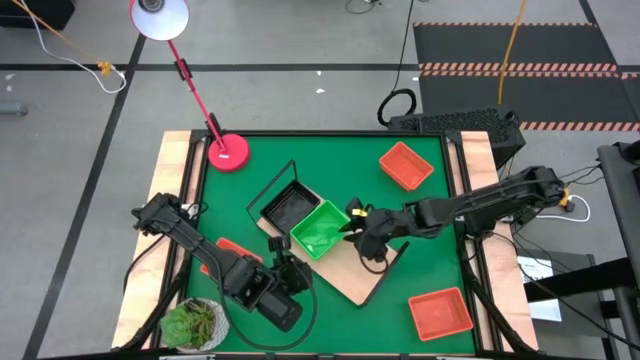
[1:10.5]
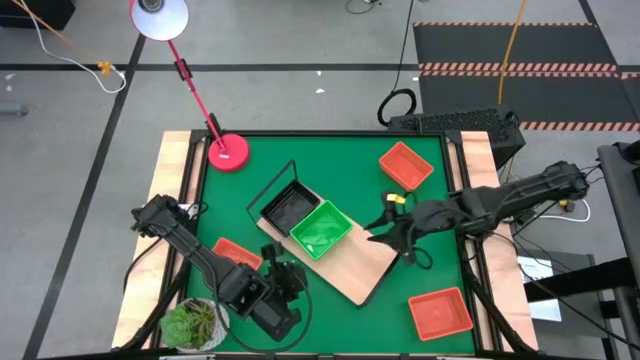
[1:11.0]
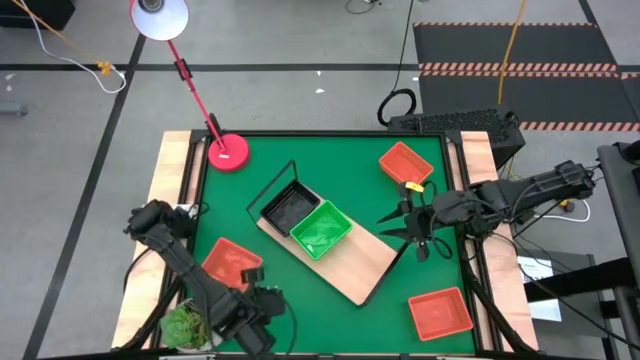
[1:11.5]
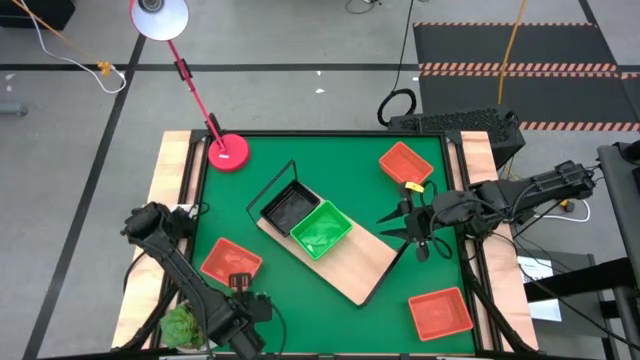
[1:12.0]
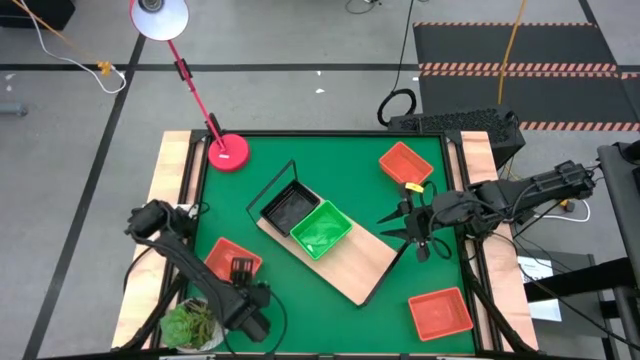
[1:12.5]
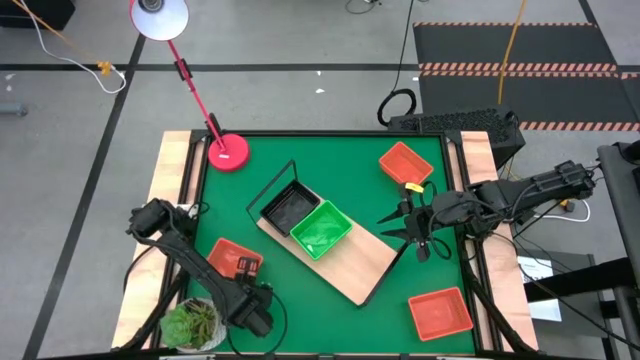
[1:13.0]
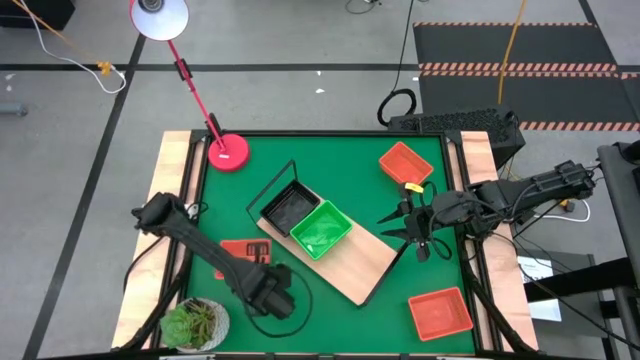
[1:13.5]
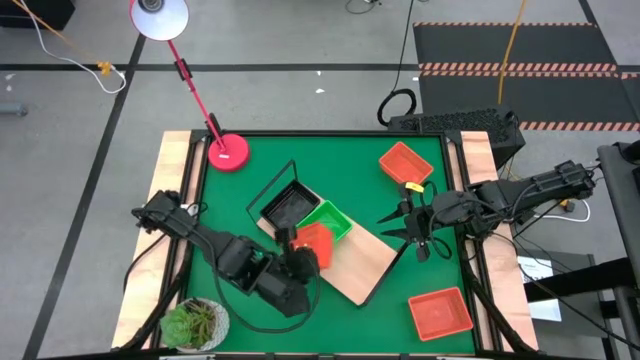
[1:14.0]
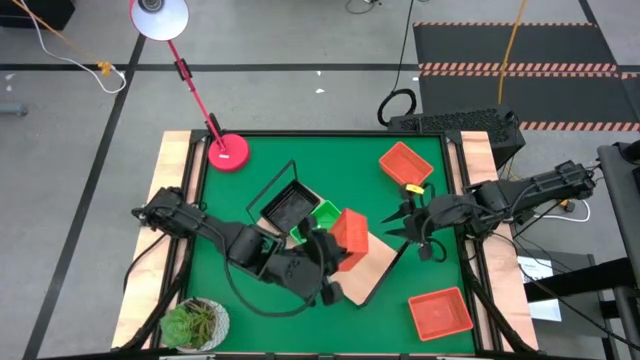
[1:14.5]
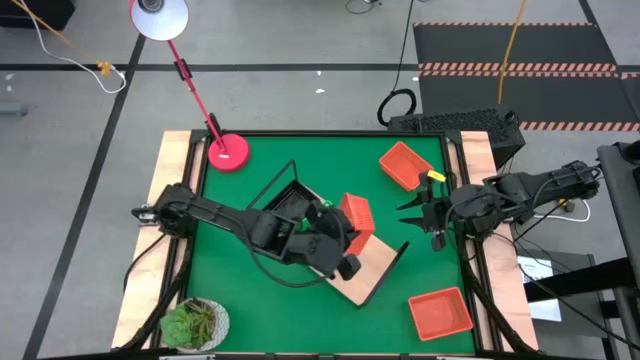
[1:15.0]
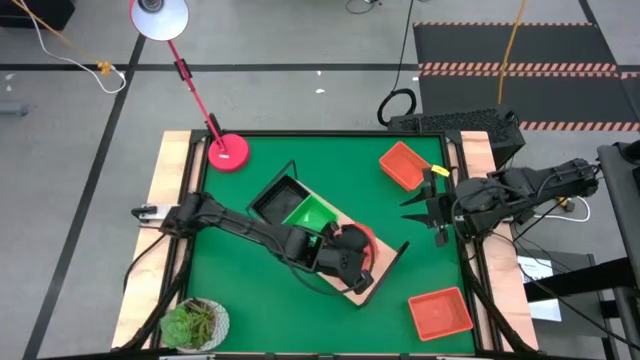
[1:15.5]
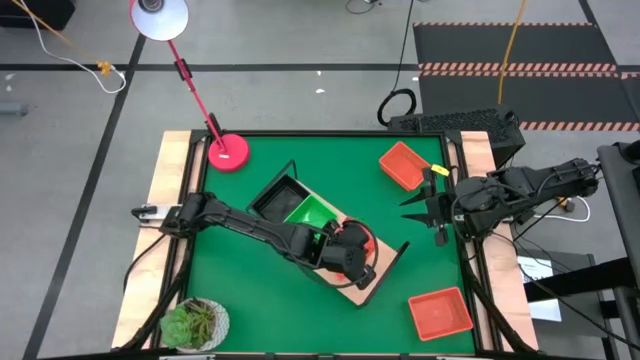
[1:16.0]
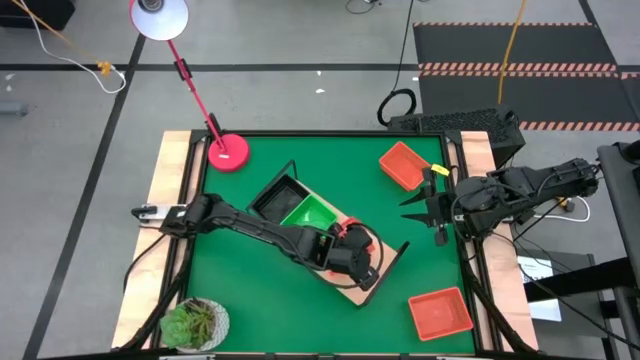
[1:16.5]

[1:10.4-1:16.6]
Task: Stack baskets on shelf by color
Put the middle orange bin on the shelf

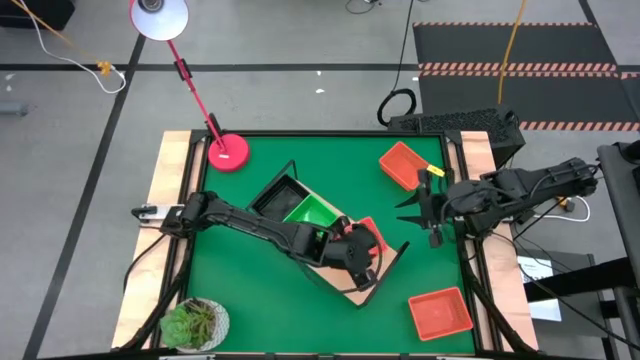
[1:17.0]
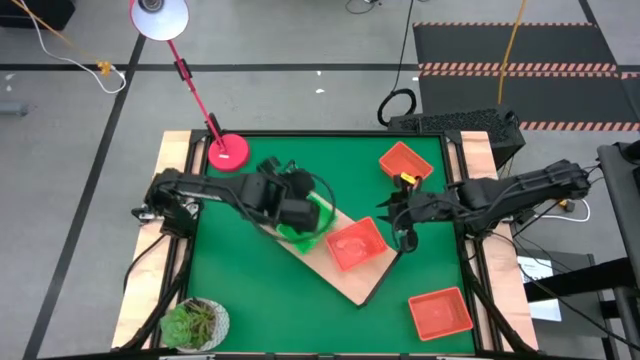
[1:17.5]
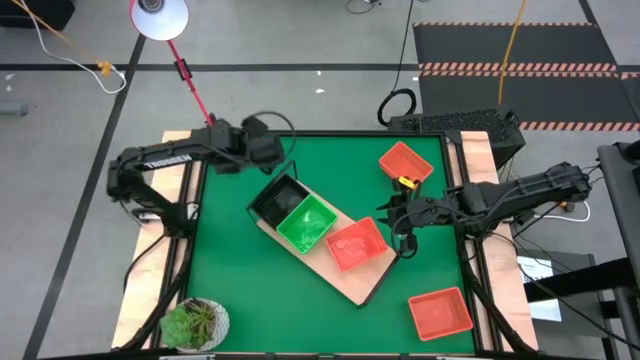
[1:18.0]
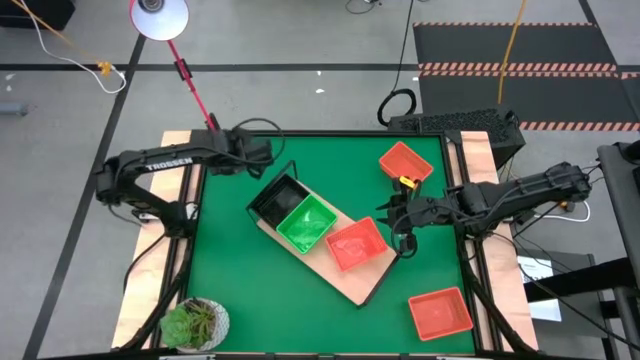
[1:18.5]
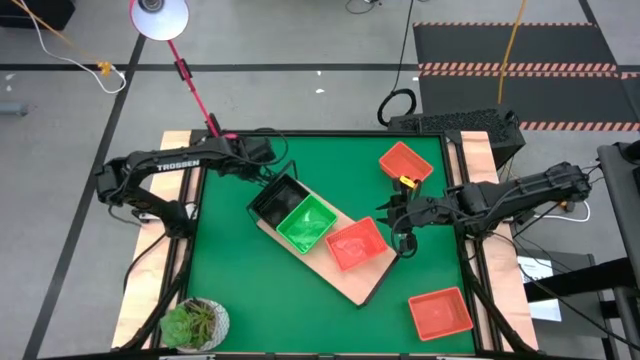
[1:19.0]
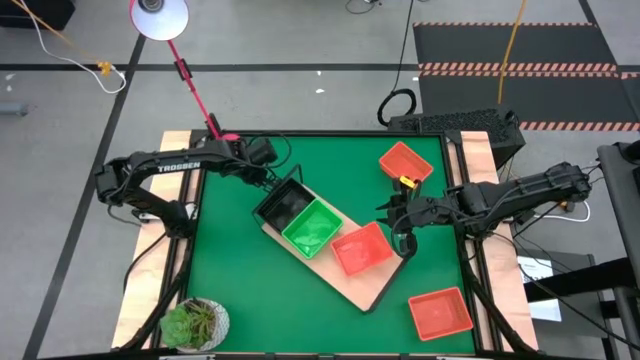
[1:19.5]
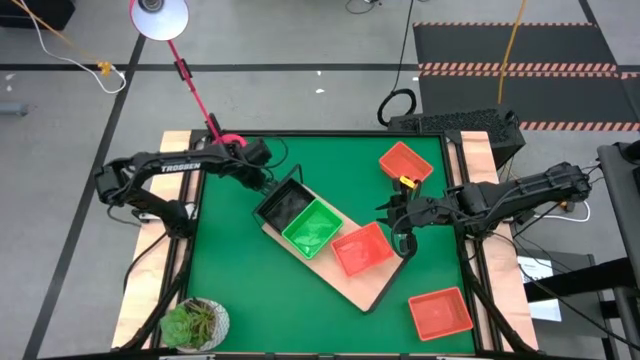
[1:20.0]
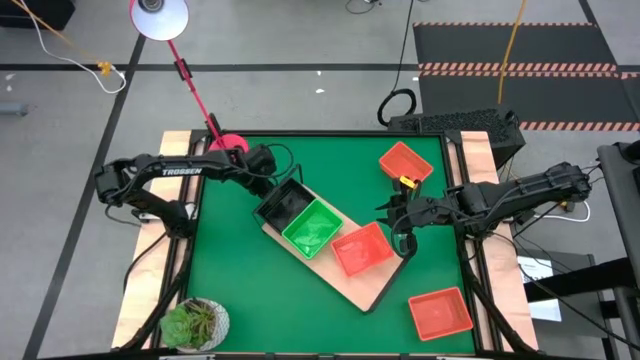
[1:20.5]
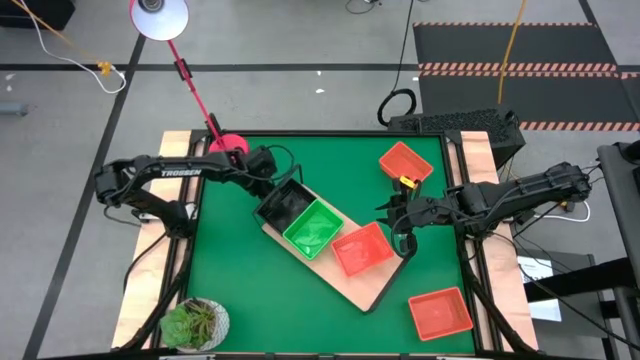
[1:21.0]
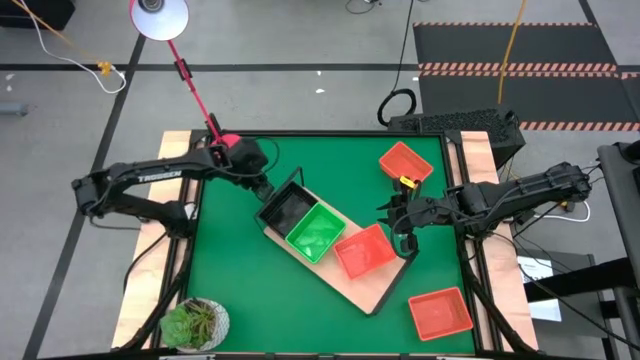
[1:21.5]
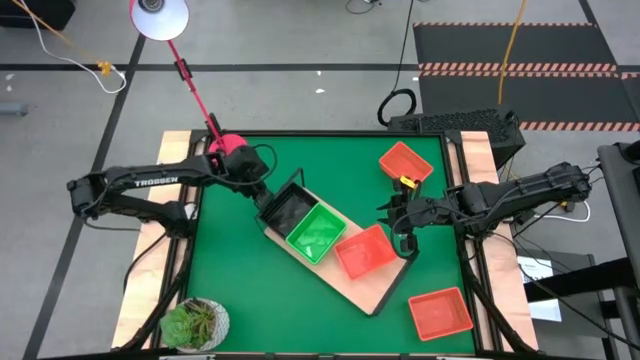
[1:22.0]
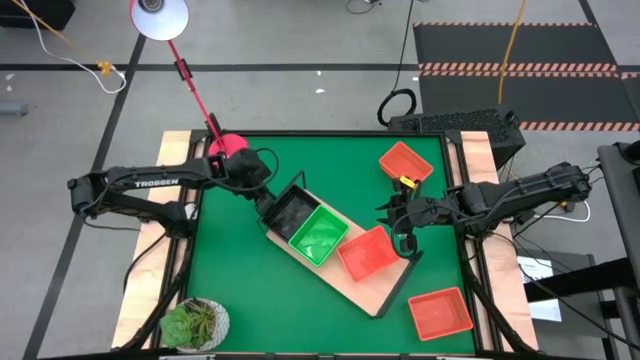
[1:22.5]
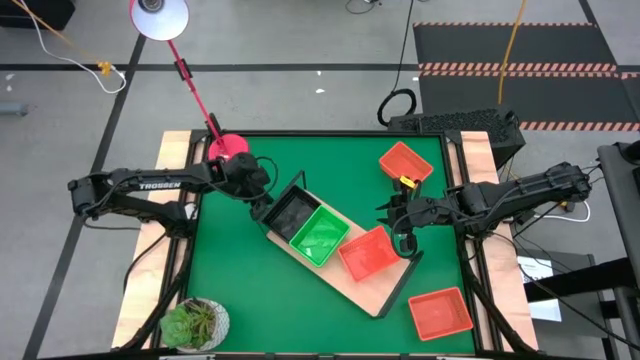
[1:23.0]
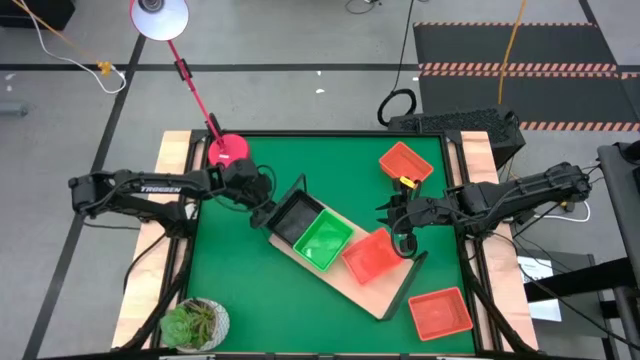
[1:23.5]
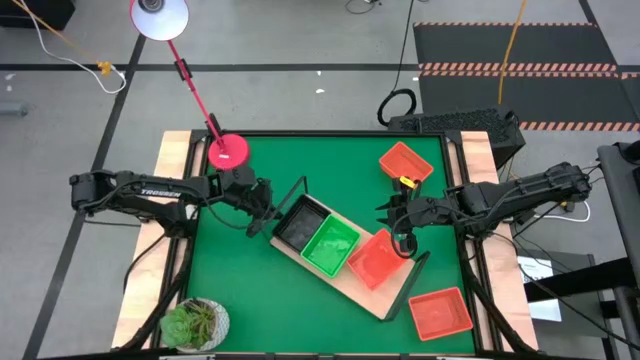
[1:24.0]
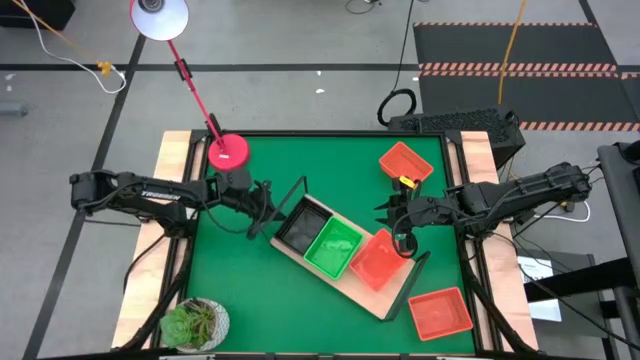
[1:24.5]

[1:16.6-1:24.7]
Adjust the stacked black bins on the shelf

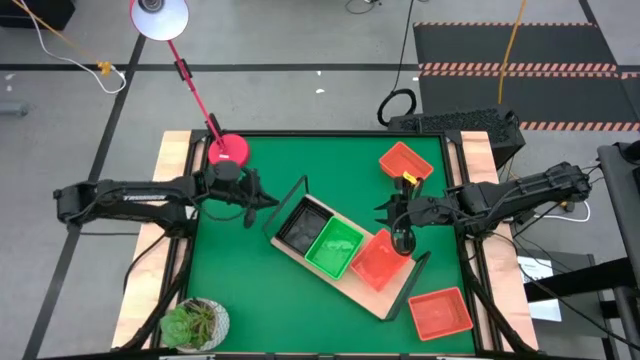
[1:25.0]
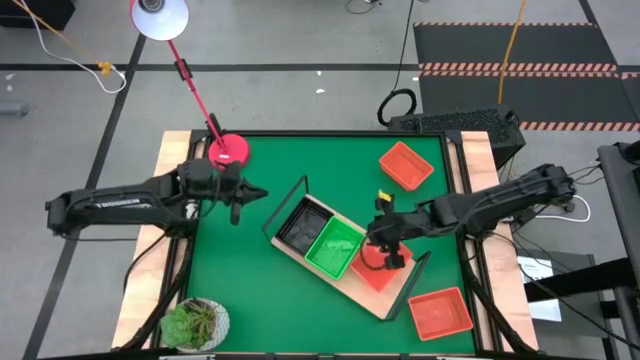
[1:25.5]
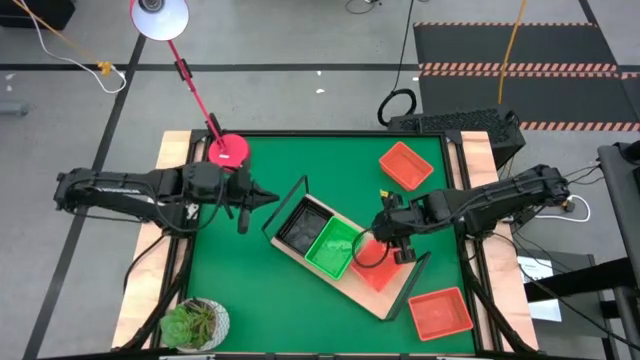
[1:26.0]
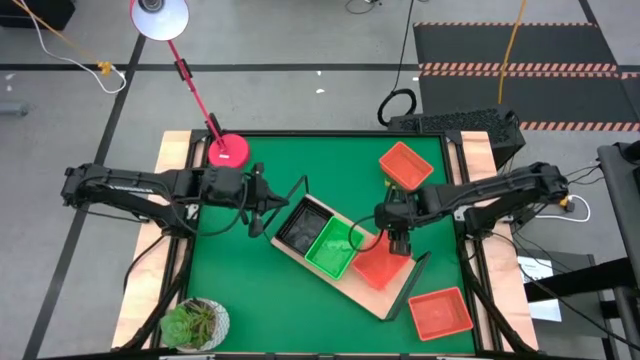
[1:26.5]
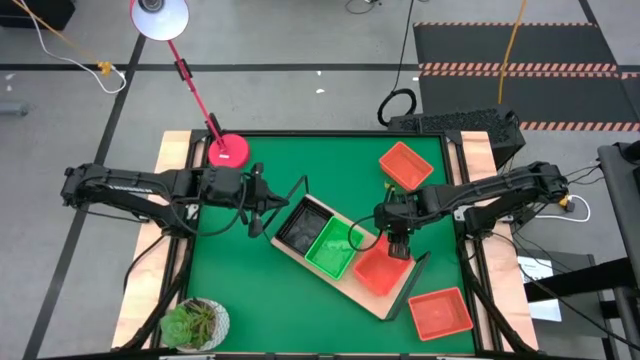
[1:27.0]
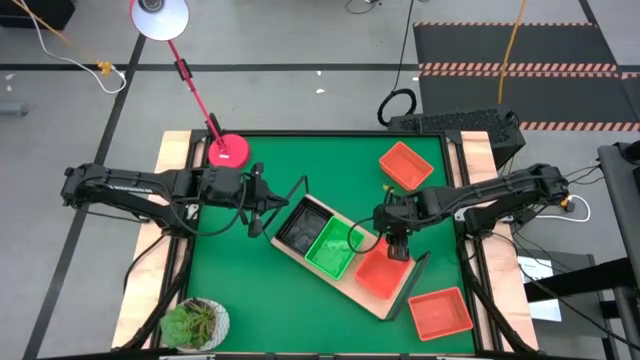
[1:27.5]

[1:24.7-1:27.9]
Adjust the orange bin on the shelf

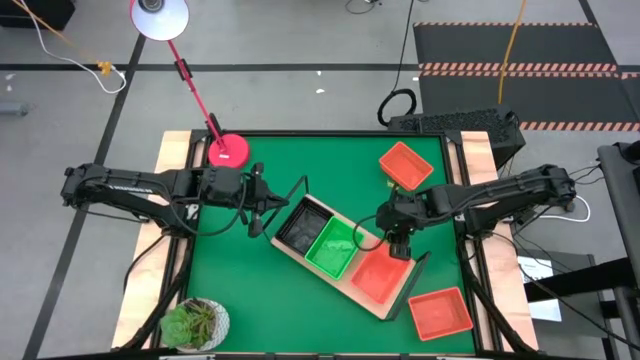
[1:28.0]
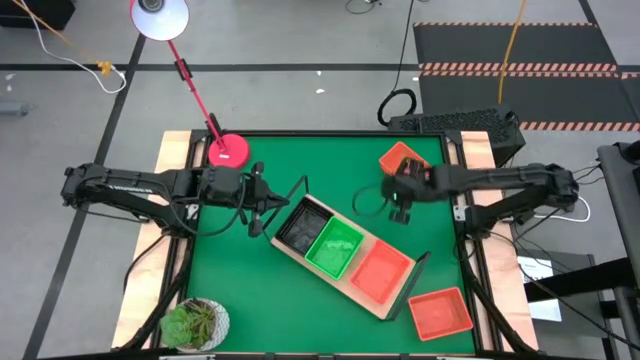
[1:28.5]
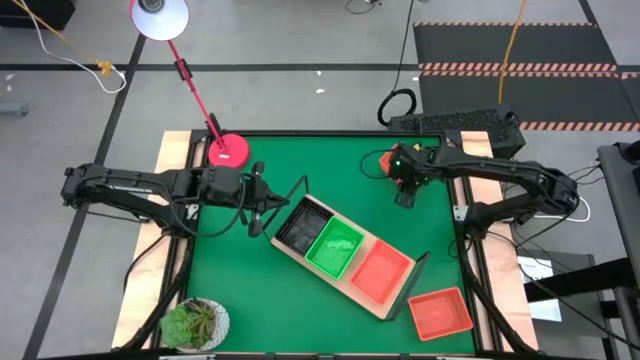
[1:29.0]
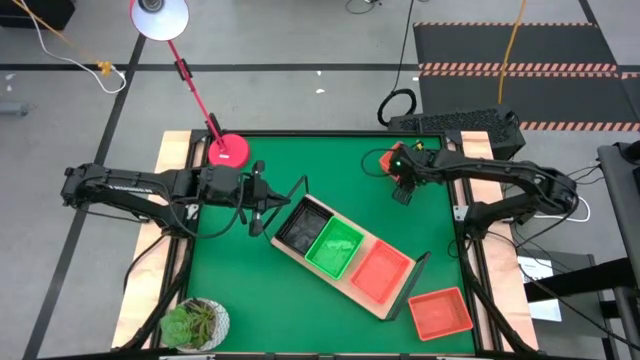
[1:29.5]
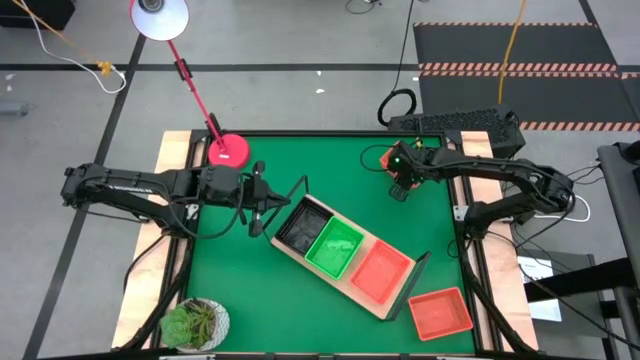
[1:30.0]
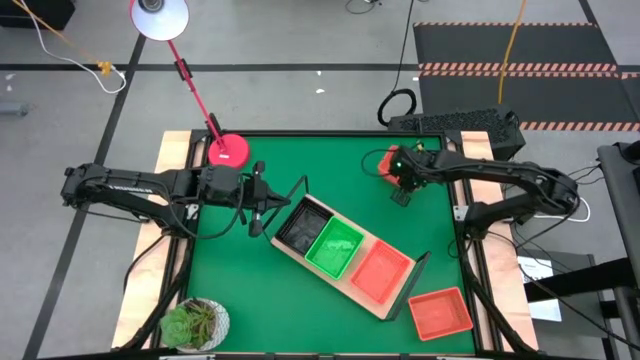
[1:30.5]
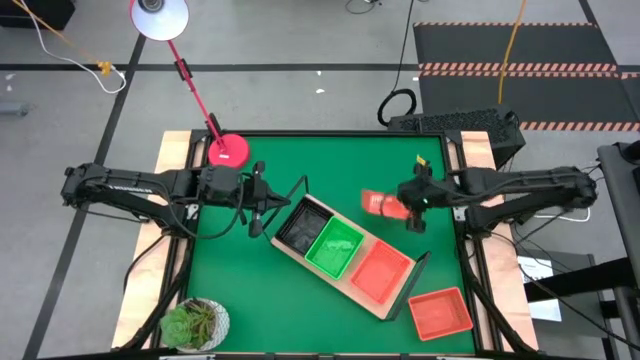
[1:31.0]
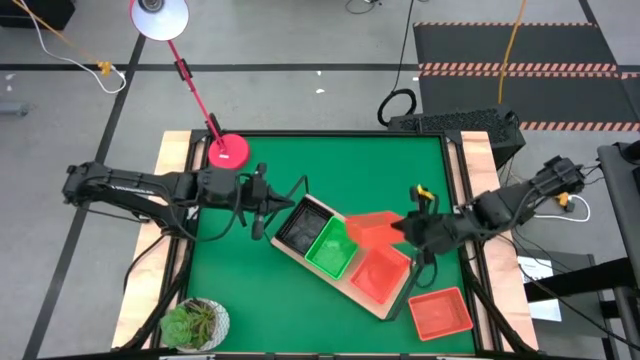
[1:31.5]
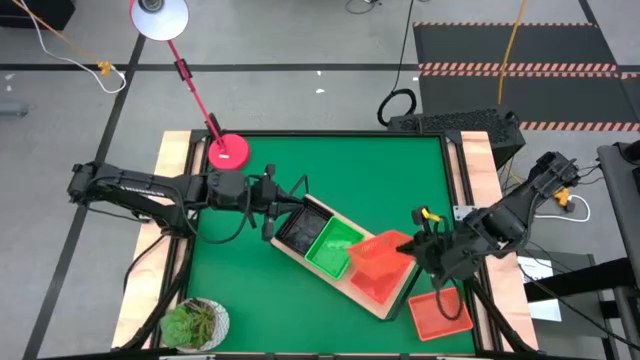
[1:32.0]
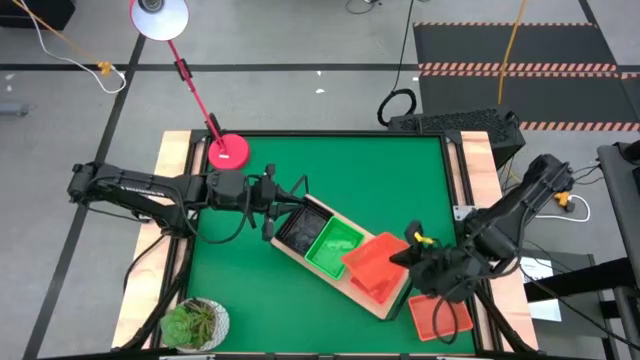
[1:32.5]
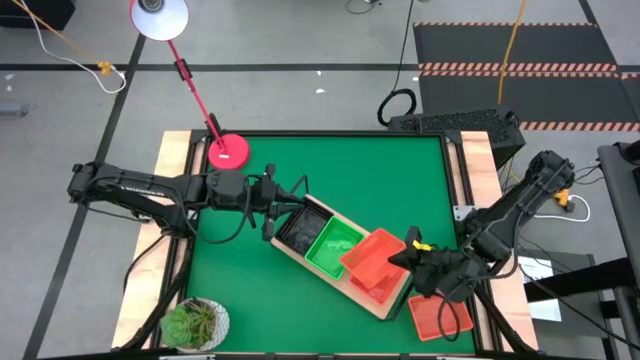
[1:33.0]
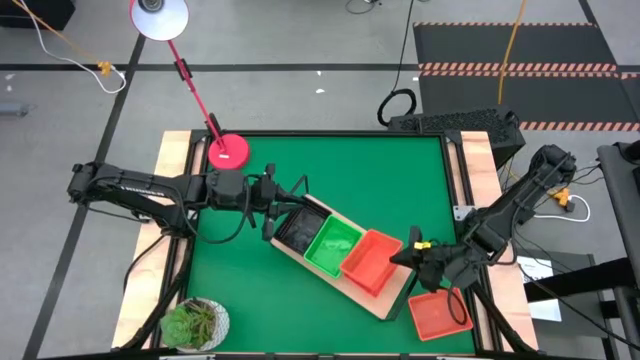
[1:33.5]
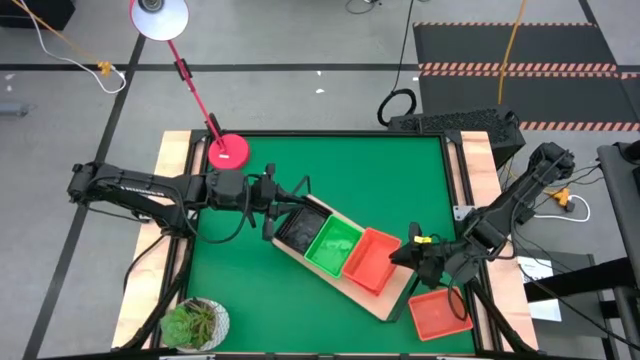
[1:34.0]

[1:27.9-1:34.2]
Stack the top orange bin on the orange bin on the shelf
